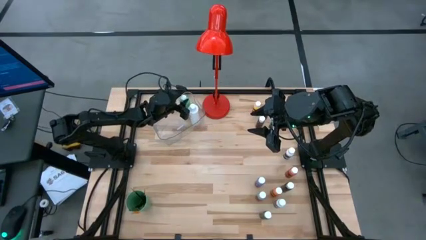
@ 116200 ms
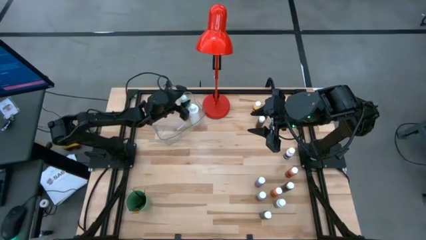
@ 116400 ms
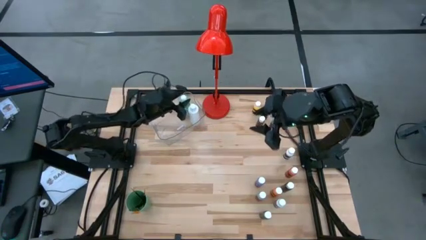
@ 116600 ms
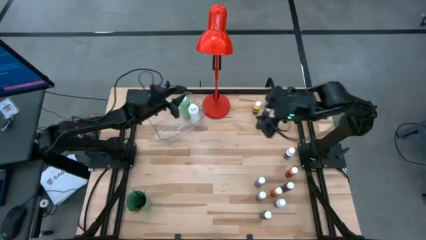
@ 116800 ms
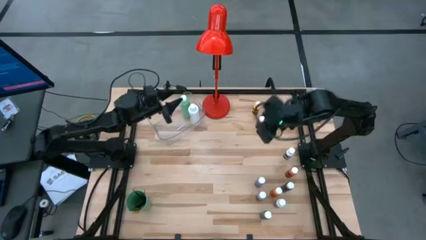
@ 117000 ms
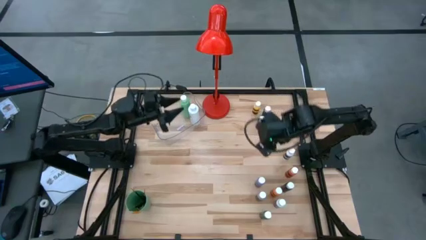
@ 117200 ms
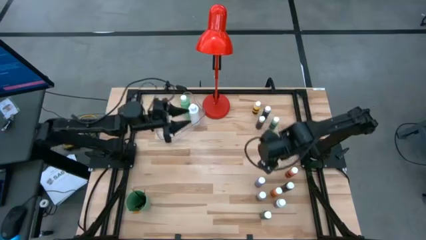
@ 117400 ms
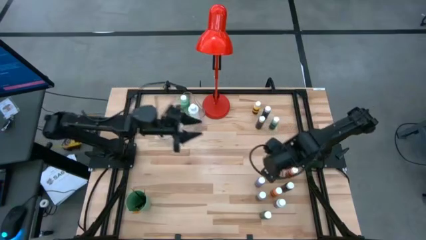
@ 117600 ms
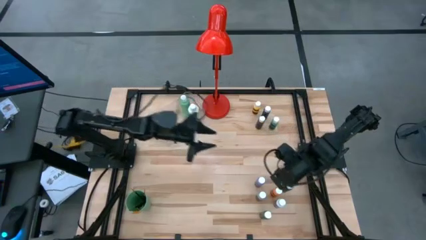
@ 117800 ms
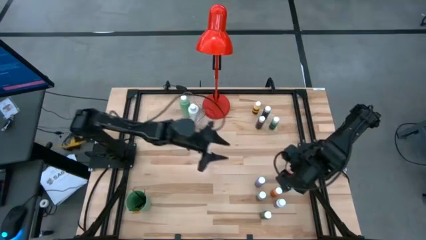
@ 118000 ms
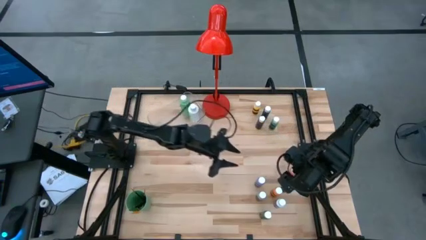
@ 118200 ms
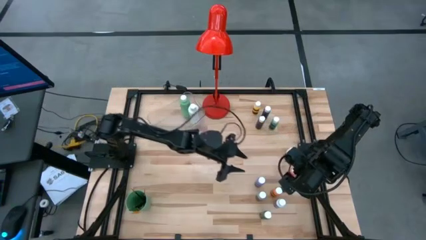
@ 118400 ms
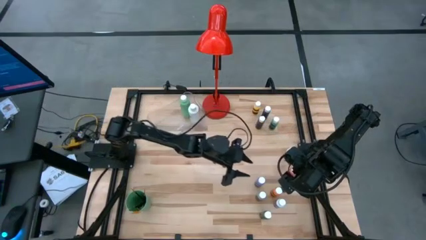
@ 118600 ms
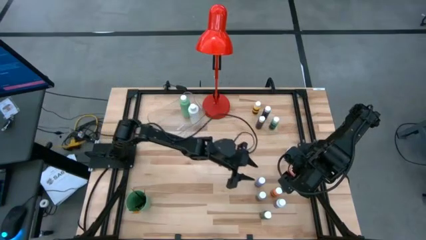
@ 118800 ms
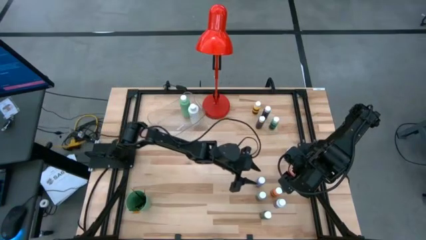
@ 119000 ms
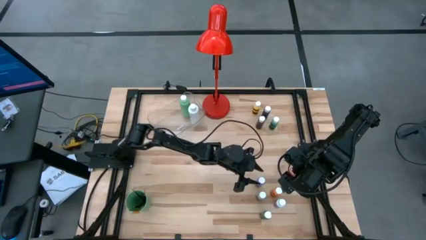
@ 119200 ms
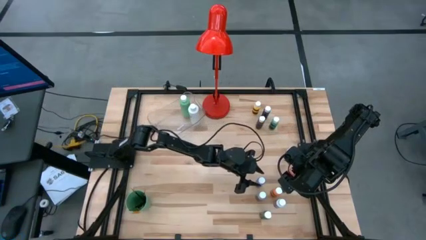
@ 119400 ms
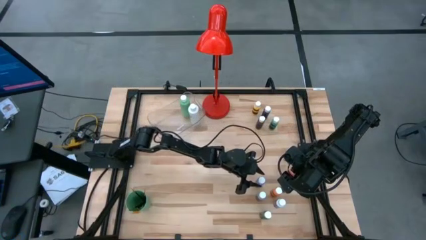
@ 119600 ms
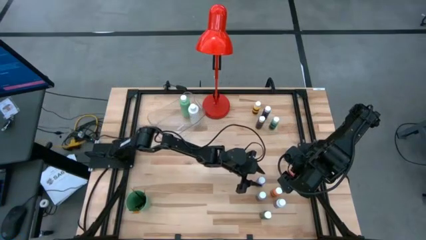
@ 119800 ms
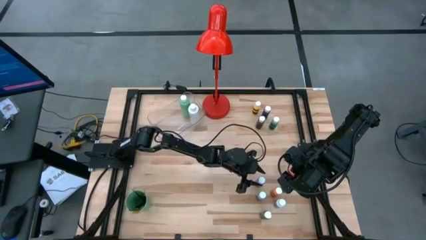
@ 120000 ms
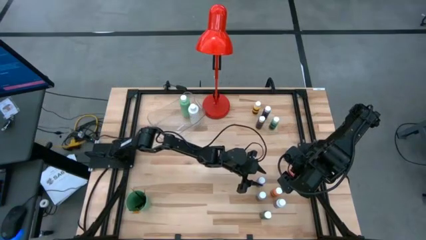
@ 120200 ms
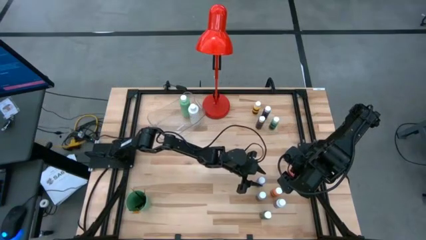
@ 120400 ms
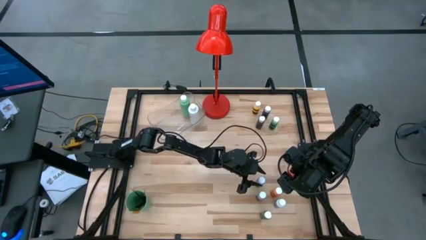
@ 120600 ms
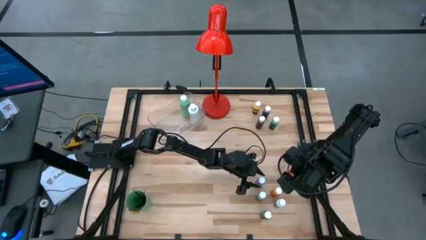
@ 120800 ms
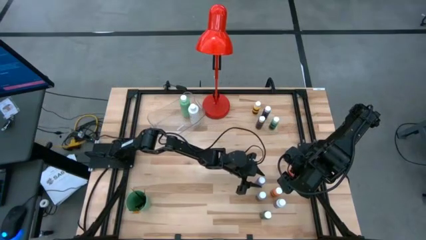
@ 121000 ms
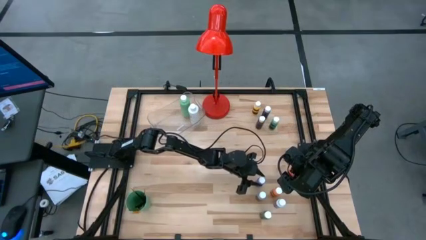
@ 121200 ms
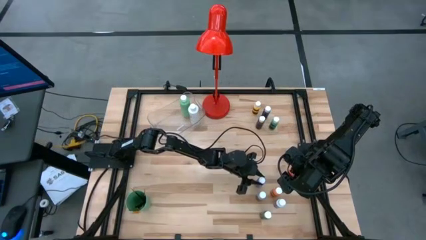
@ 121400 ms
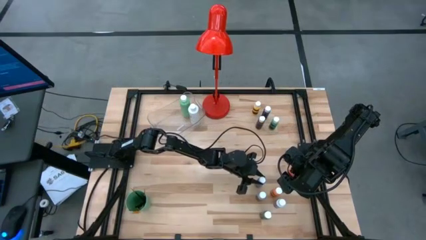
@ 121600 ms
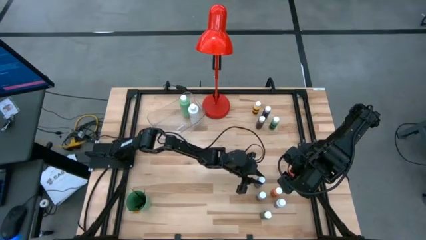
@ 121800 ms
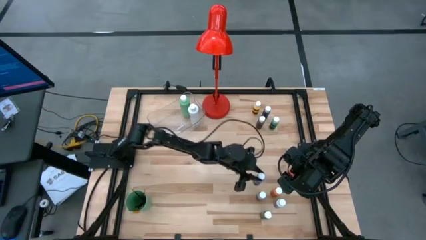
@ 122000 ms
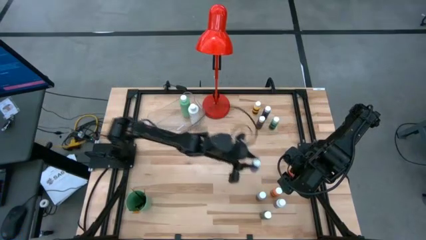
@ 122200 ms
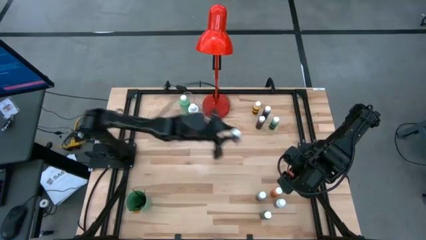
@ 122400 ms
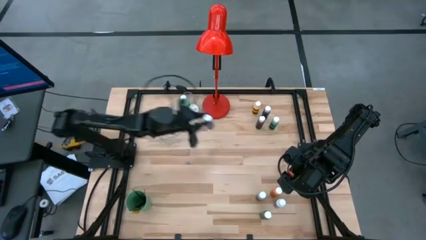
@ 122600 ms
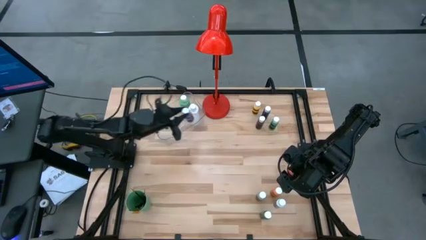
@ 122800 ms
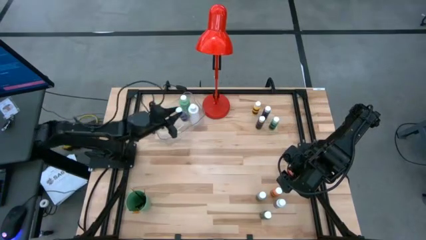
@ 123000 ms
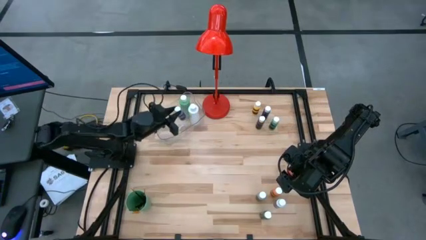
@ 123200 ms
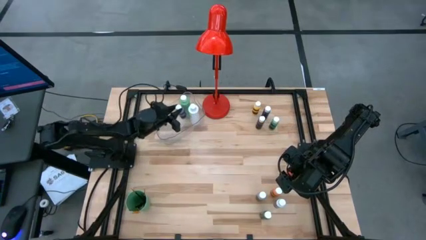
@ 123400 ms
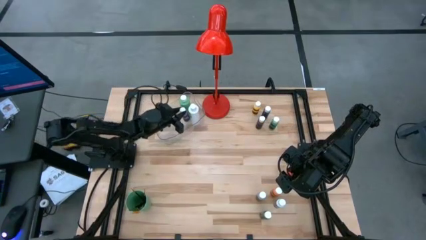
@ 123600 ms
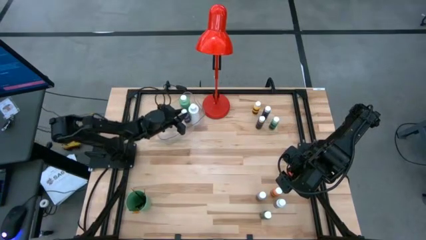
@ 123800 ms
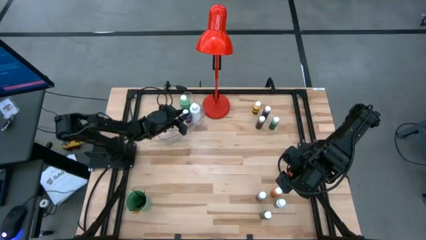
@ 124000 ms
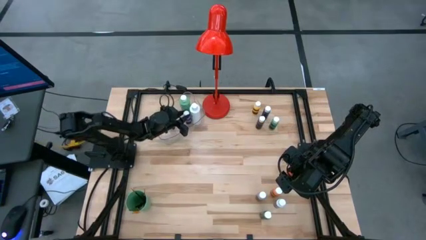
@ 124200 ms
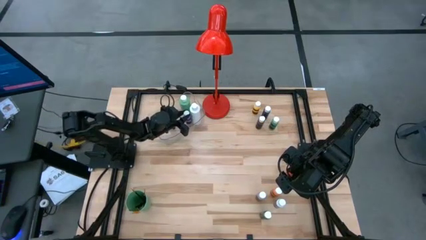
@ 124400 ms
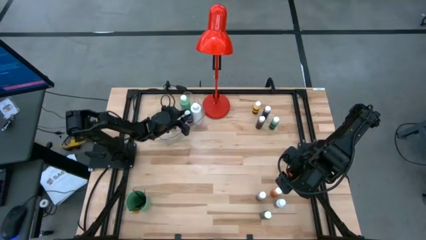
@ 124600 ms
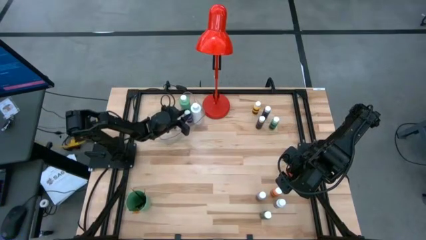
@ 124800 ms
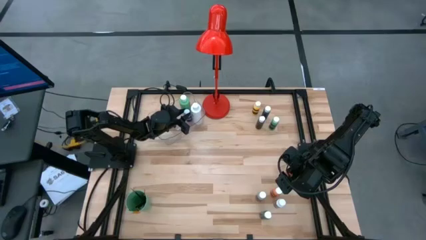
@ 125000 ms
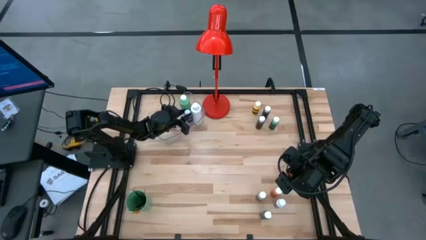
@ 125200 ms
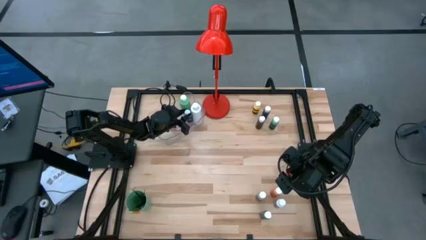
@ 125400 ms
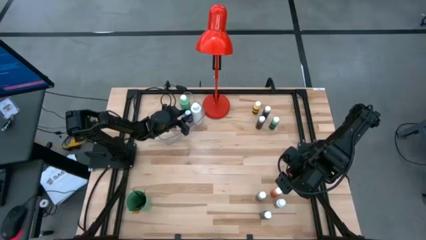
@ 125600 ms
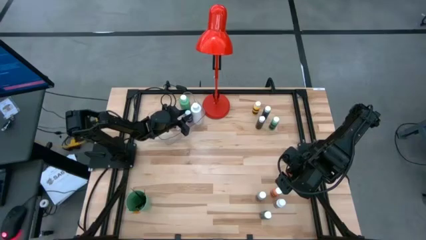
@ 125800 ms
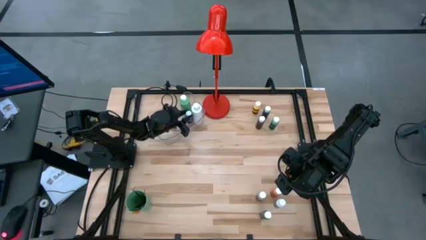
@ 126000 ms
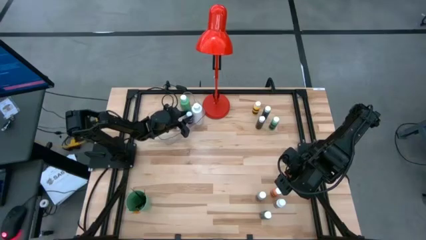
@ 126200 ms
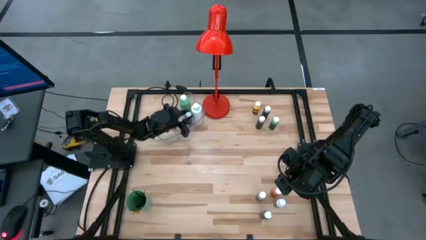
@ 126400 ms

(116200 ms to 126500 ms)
Task: Pick & Place Paint Supplies
Put the purple paint bottle into the transparent bin
